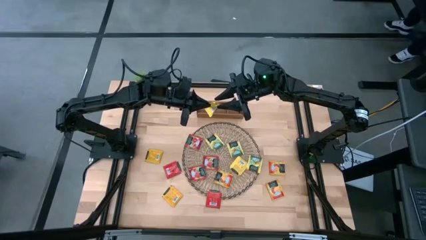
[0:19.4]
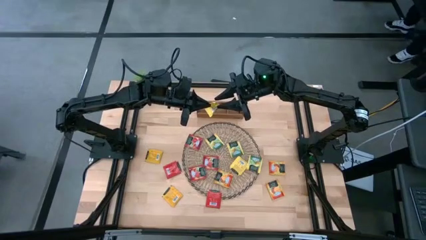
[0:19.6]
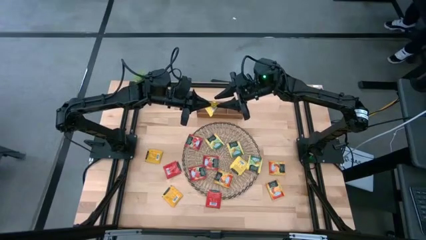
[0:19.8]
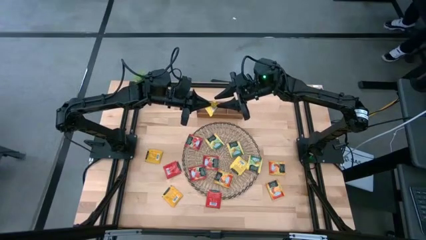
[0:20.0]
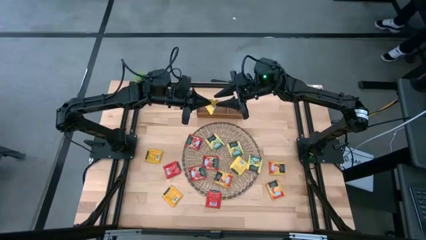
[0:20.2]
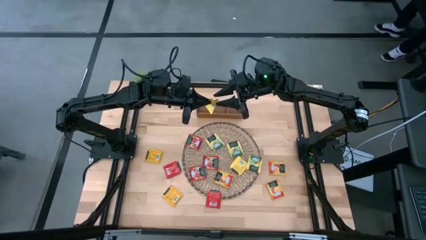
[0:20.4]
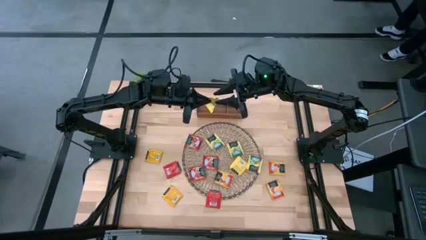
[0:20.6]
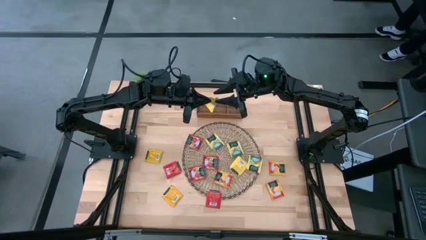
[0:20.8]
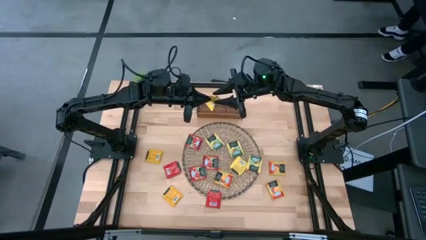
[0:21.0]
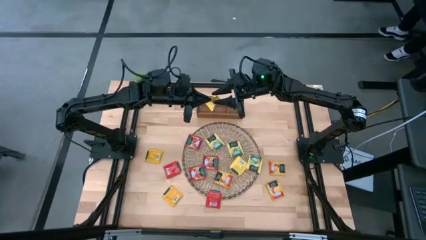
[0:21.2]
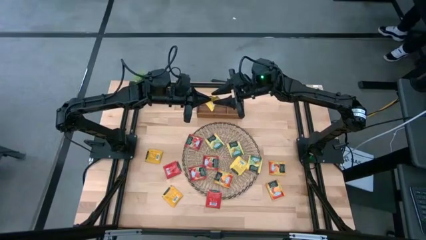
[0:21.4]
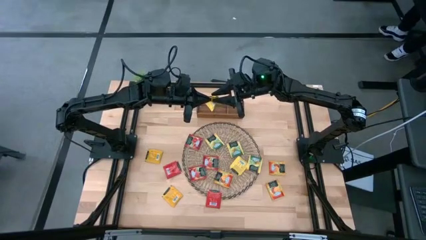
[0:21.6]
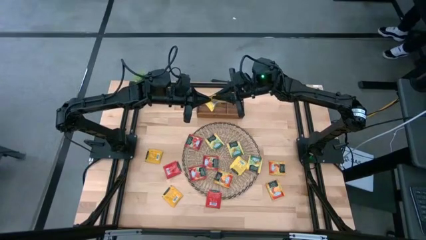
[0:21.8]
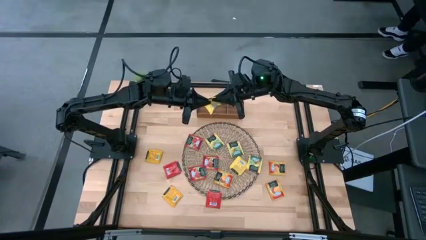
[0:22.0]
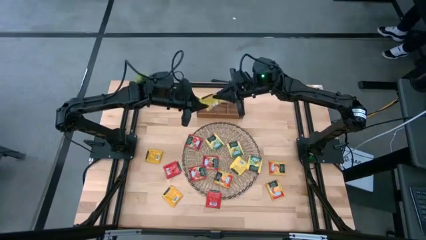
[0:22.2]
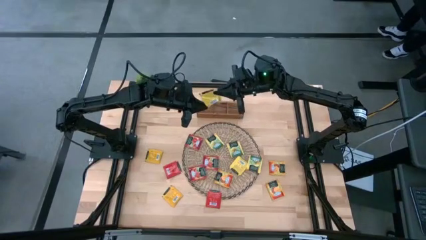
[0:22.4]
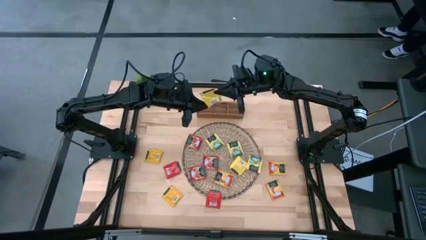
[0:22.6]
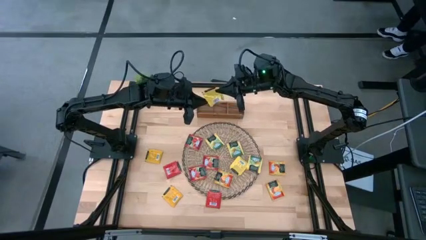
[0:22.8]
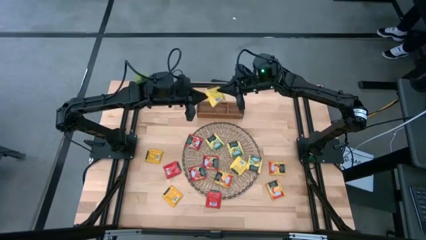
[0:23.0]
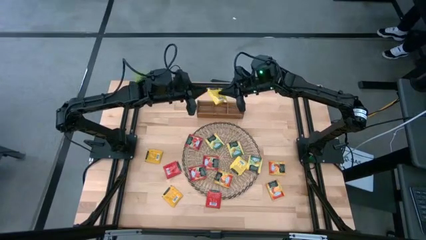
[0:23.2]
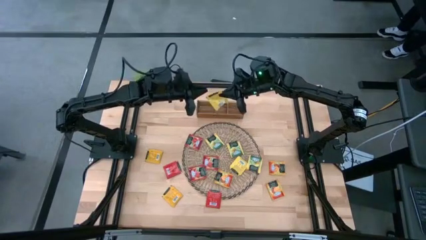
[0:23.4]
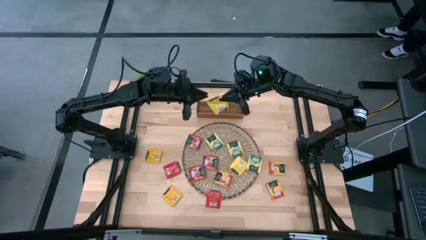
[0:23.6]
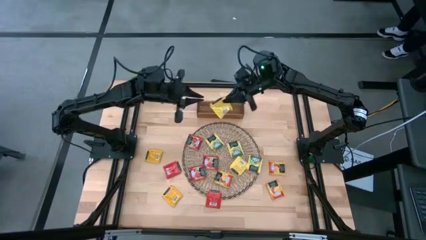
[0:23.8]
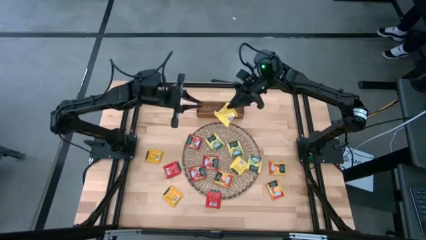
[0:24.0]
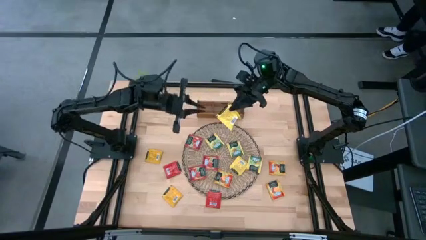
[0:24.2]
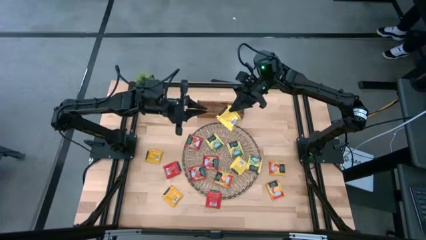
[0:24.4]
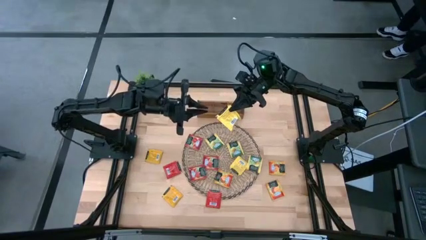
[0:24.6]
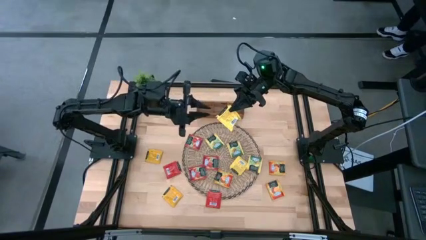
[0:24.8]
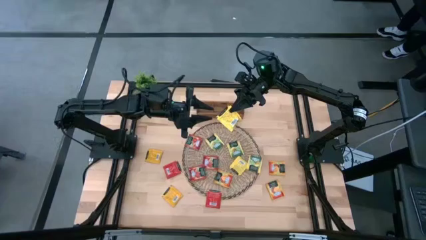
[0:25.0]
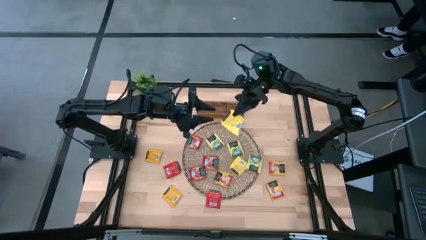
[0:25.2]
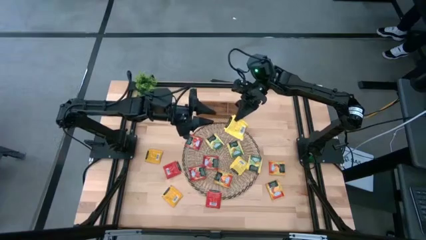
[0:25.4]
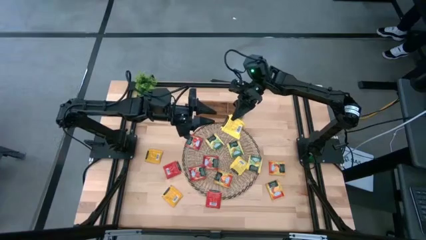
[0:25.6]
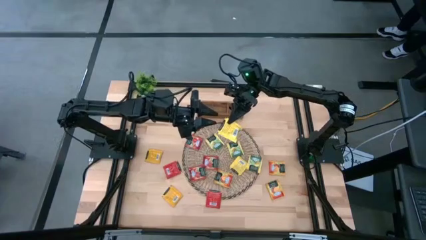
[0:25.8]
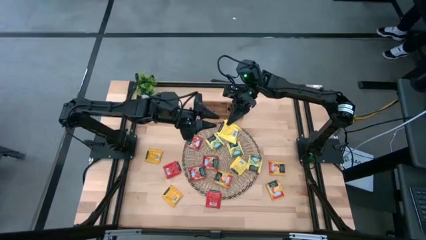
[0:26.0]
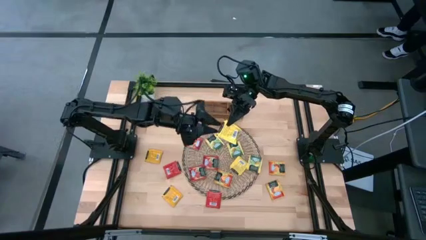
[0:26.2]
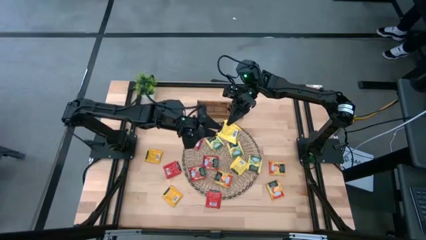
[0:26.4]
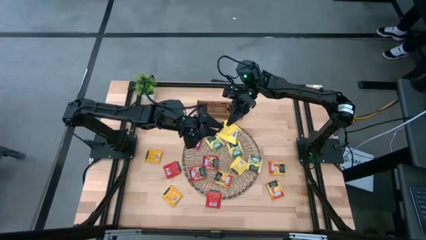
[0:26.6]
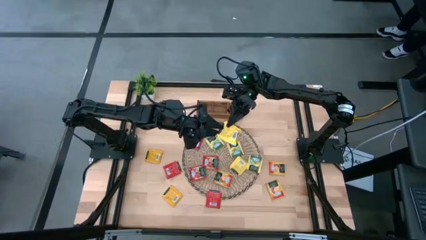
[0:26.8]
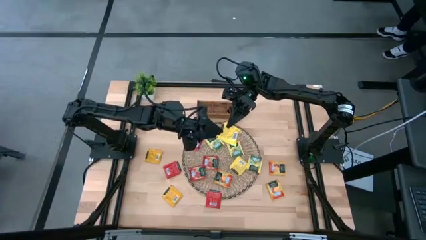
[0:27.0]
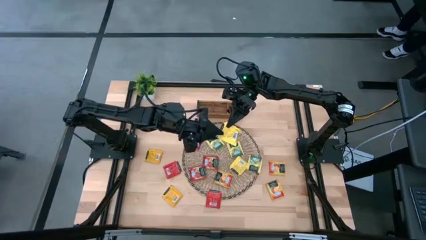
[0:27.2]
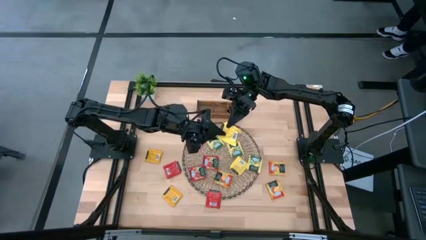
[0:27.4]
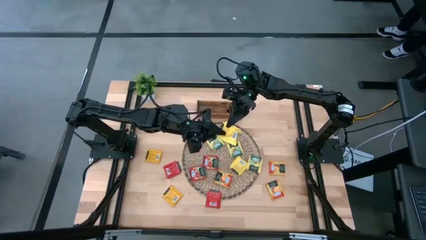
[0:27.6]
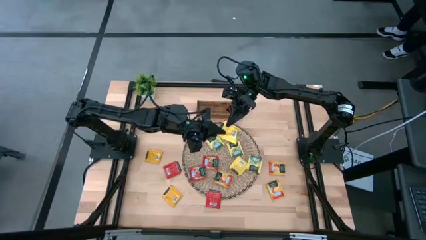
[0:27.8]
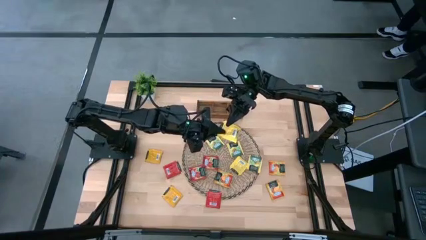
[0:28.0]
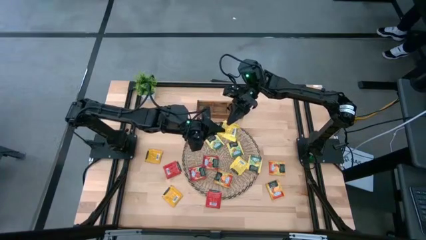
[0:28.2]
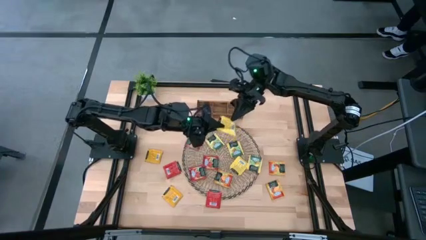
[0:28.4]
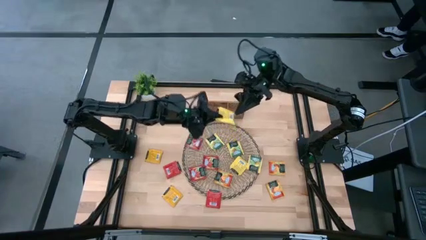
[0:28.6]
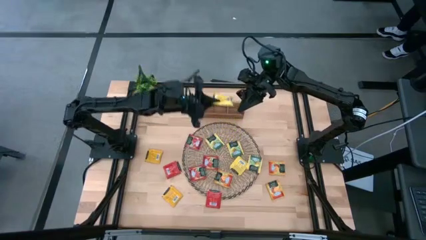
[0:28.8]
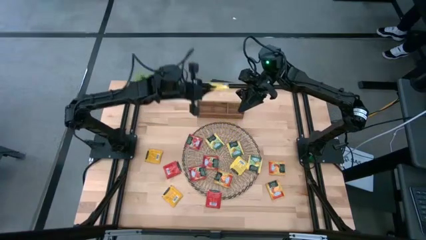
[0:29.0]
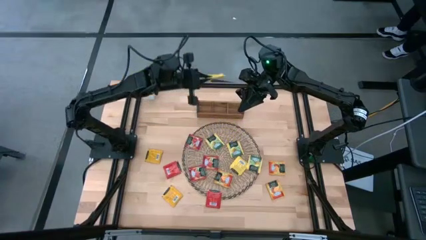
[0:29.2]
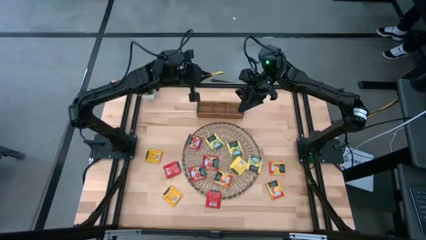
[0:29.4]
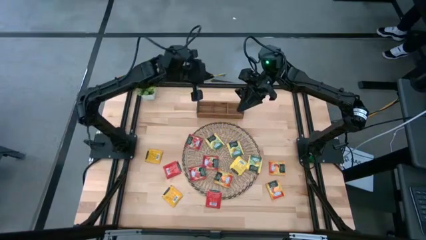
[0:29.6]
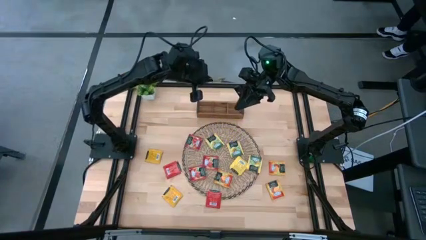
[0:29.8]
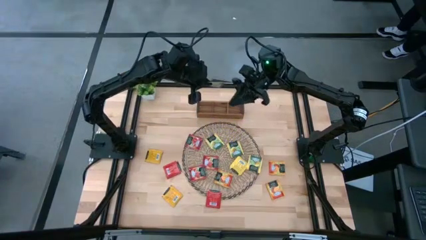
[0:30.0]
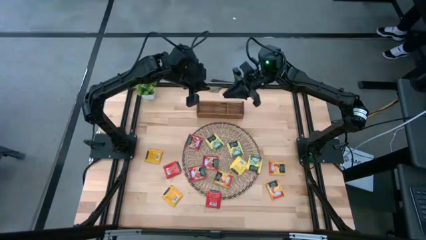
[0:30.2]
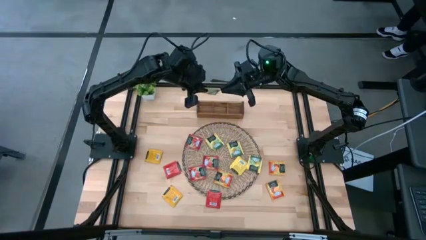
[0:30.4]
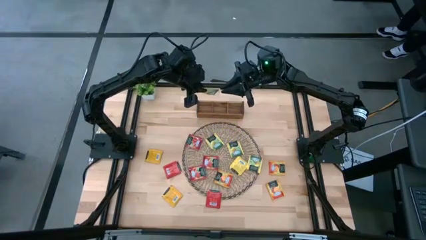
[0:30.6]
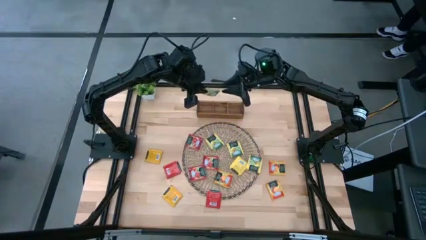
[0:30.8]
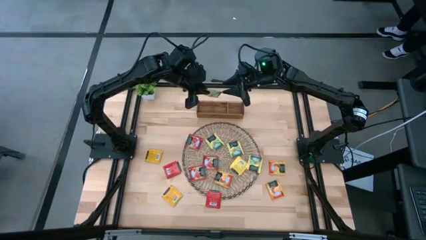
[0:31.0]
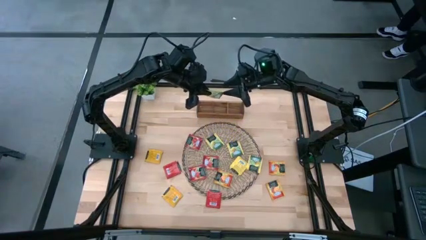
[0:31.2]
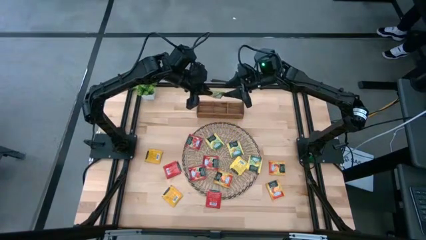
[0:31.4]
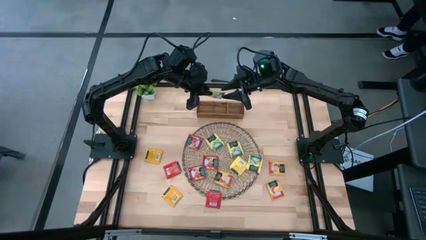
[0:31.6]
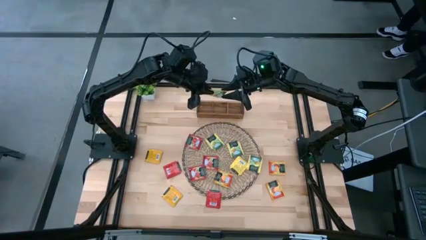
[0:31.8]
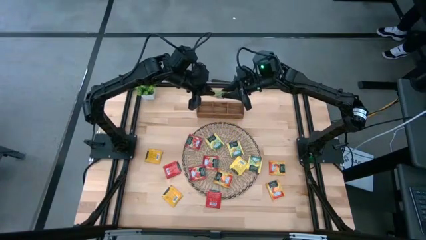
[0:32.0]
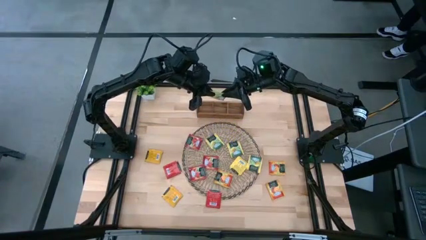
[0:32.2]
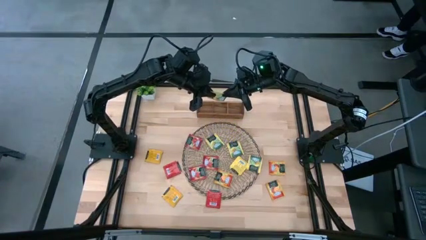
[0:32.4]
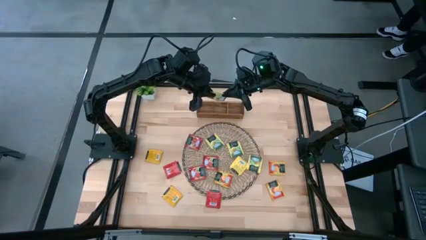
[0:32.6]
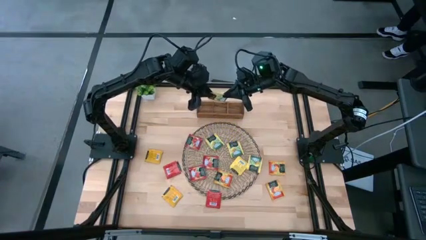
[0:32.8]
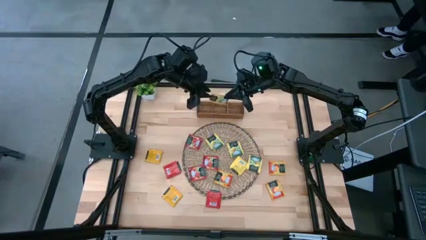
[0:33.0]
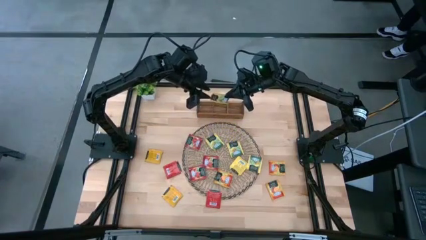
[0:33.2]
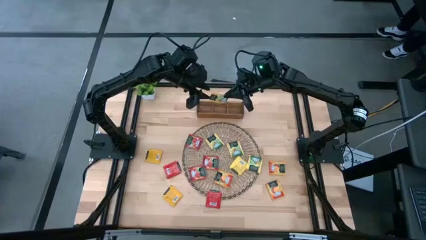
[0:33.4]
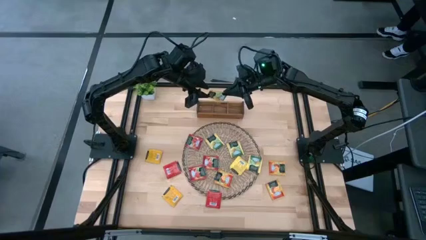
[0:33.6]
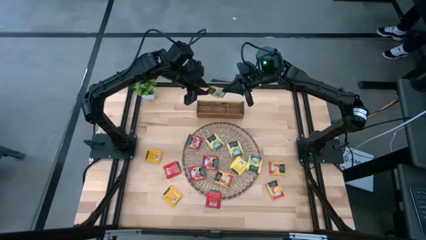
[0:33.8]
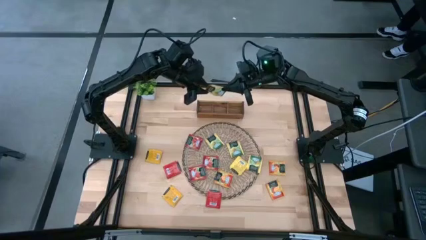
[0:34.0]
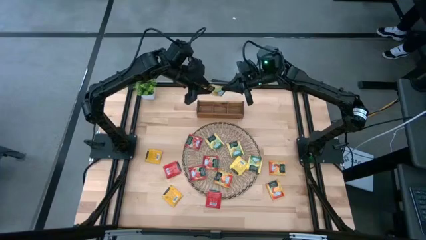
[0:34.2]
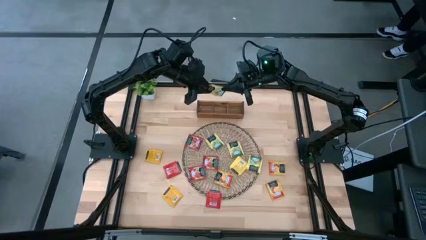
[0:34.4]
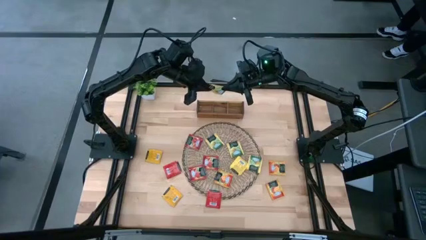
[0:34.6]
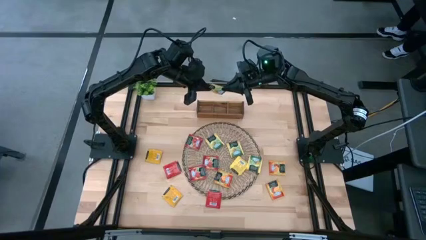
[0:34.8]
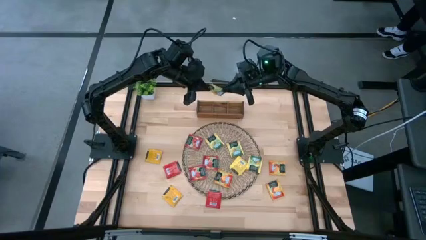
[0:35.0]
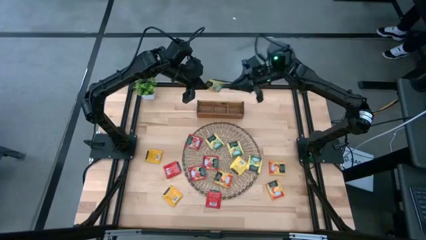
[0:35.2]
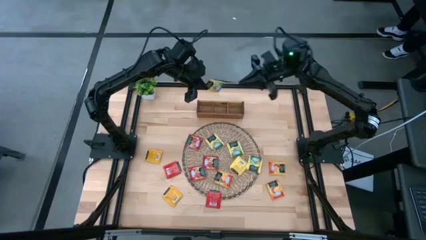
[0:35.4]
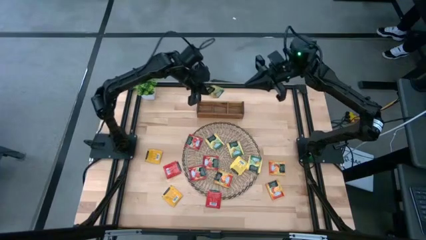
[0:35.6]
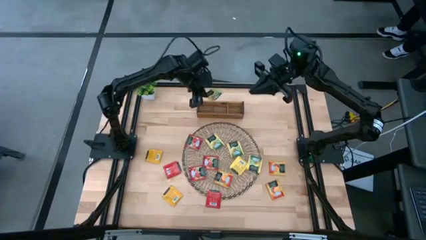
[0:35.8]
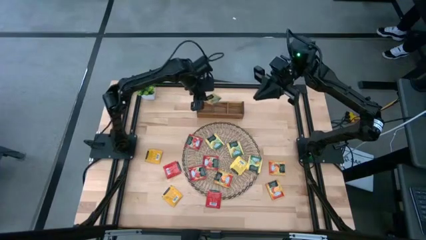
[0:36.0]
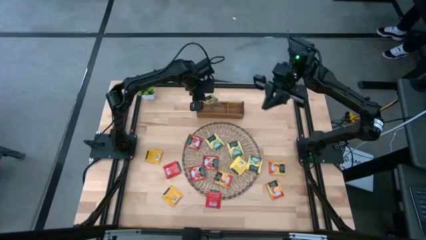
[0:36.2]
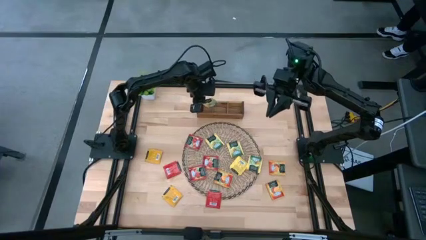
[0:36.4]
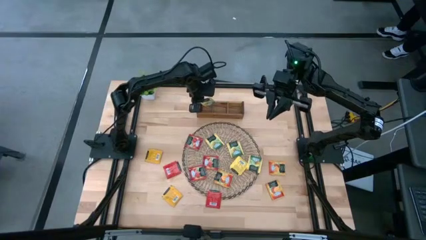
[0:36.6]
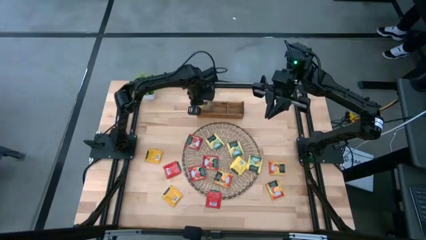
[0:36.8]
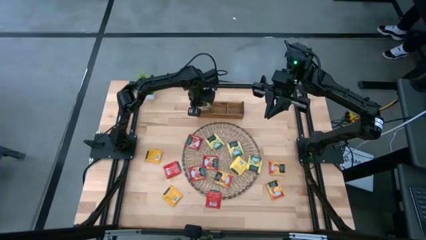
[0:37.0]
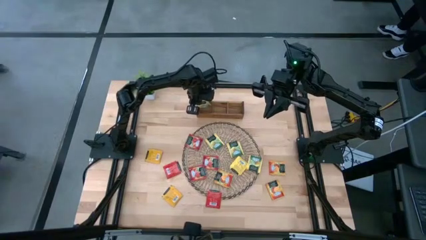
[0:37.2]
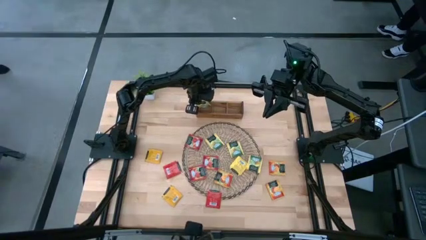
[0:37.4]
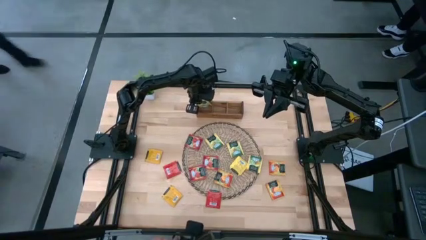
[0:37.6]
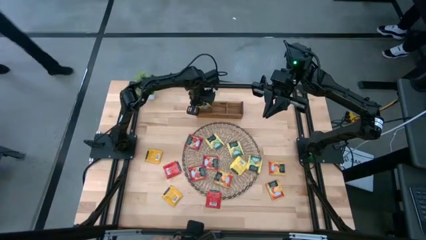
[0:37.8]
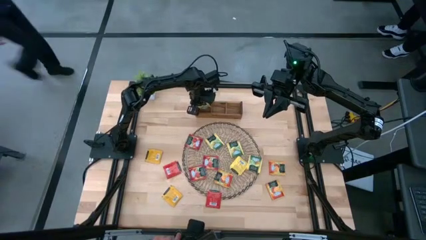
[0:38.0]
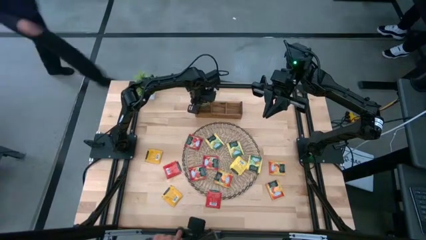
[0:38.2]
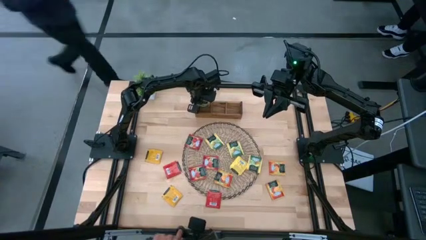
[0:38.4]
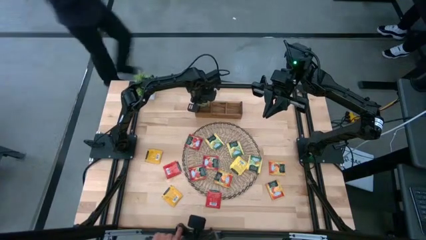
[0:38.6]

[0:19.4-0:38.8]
Task: Pick & Place Tea
Put the yellow tea bag into the left of the wooden organizer
